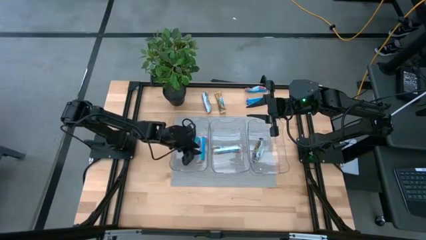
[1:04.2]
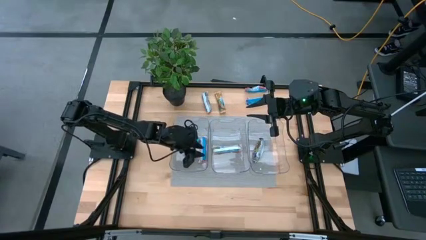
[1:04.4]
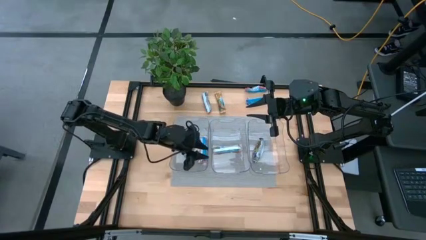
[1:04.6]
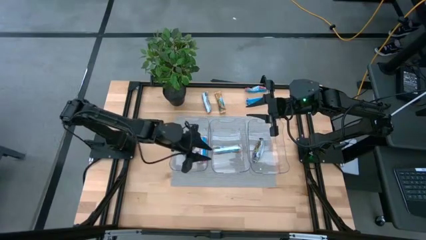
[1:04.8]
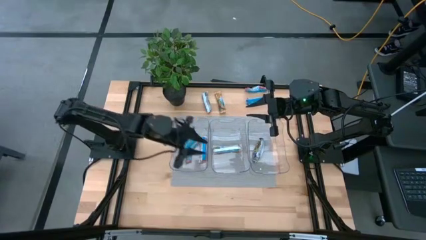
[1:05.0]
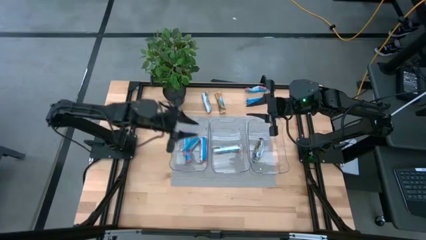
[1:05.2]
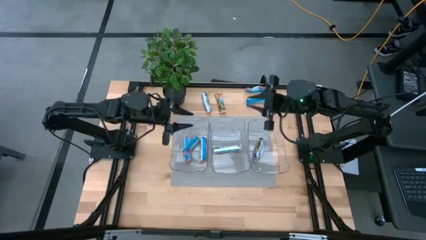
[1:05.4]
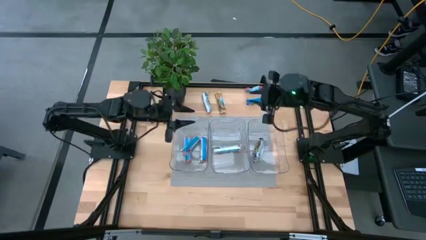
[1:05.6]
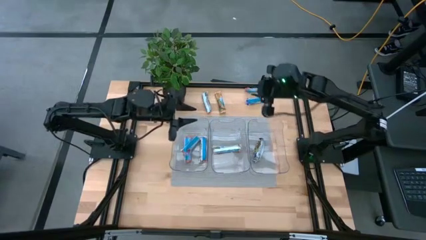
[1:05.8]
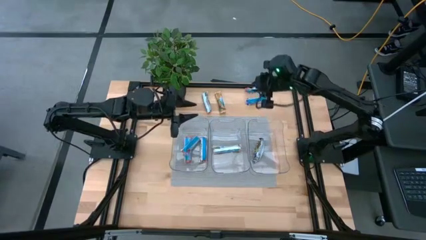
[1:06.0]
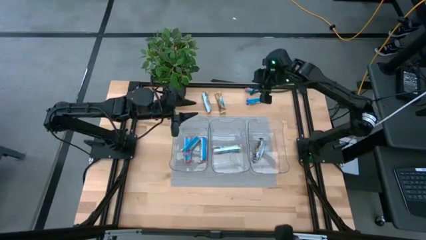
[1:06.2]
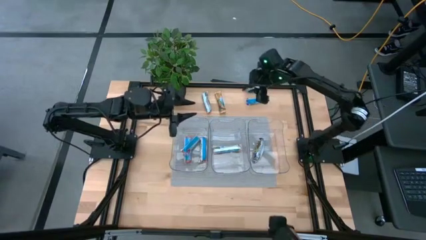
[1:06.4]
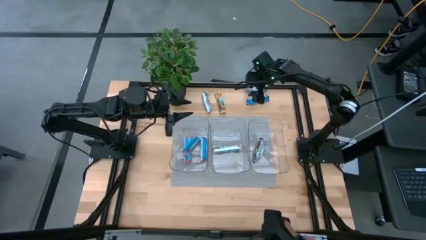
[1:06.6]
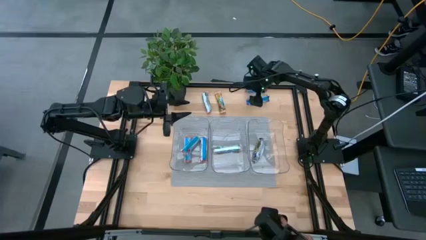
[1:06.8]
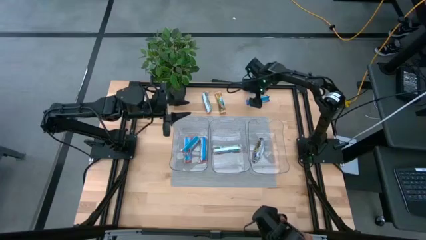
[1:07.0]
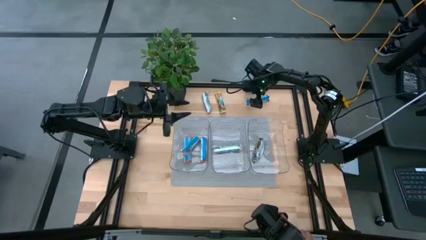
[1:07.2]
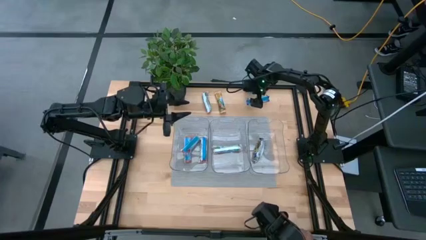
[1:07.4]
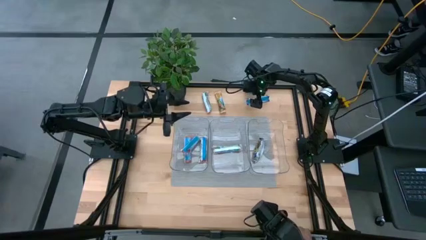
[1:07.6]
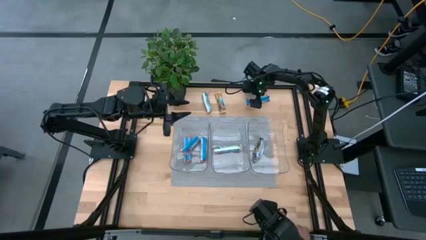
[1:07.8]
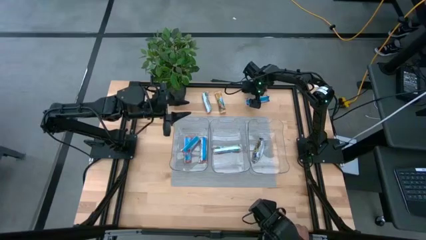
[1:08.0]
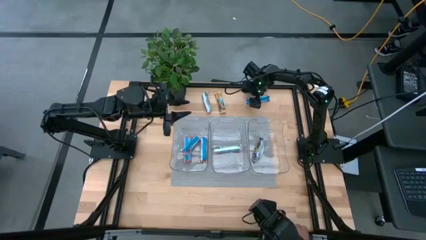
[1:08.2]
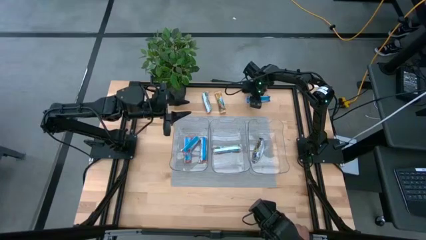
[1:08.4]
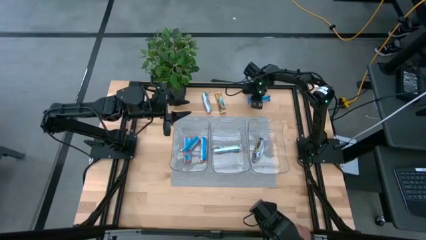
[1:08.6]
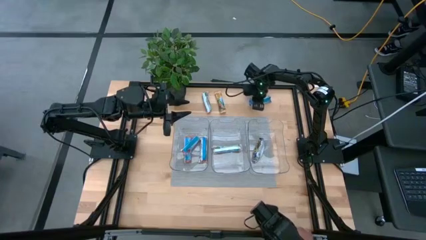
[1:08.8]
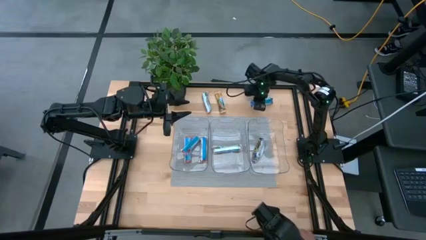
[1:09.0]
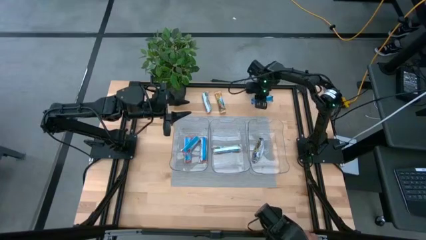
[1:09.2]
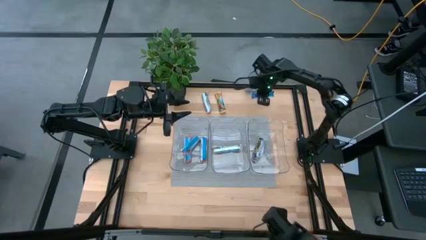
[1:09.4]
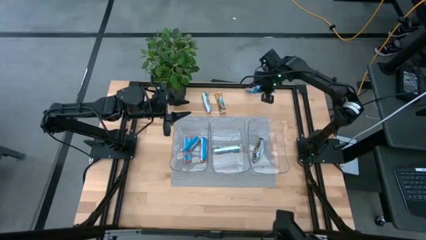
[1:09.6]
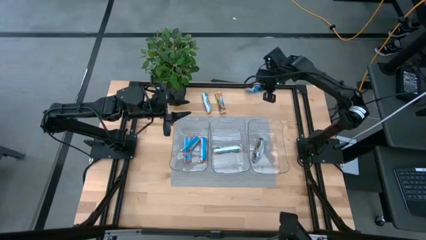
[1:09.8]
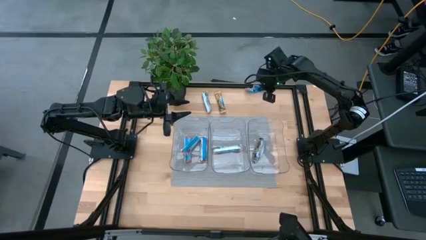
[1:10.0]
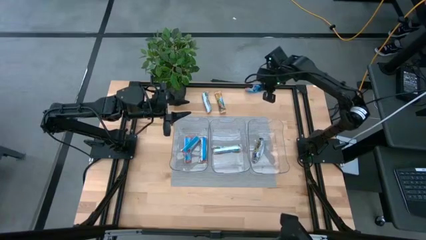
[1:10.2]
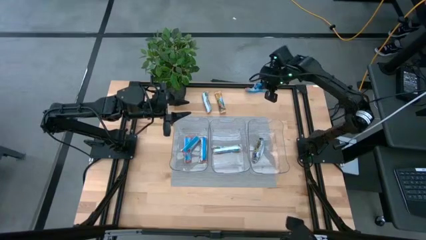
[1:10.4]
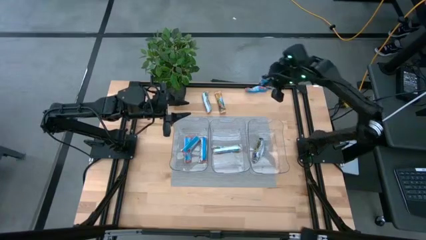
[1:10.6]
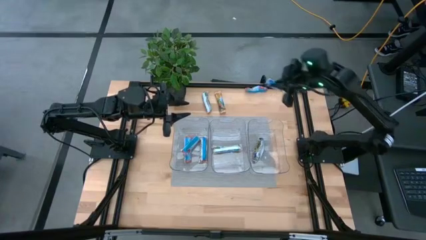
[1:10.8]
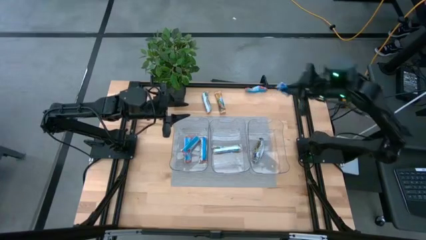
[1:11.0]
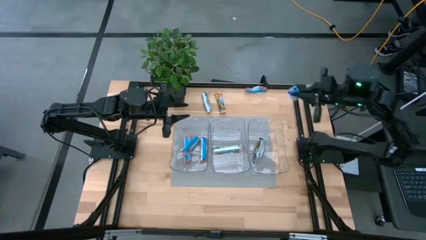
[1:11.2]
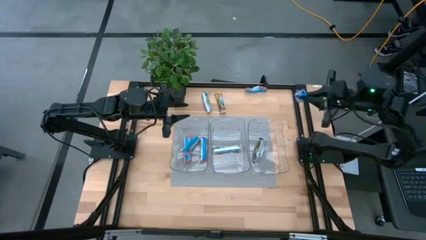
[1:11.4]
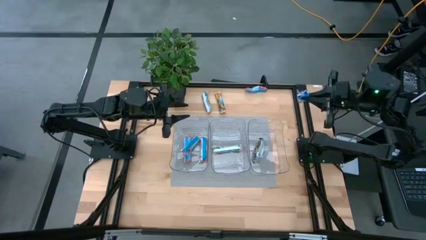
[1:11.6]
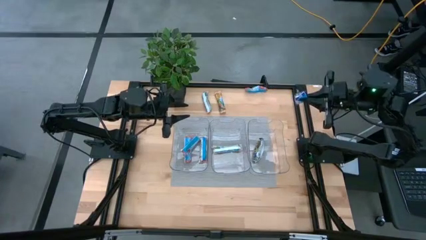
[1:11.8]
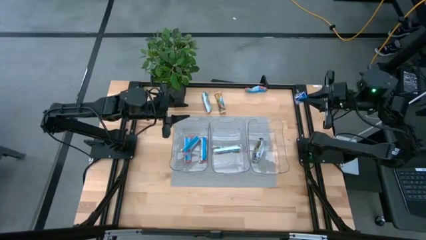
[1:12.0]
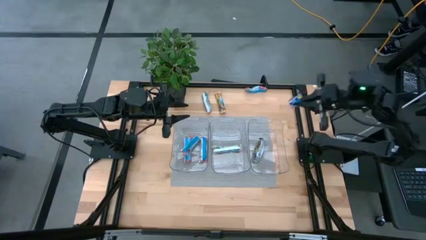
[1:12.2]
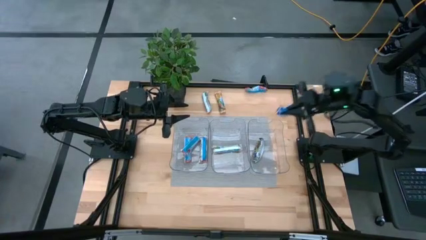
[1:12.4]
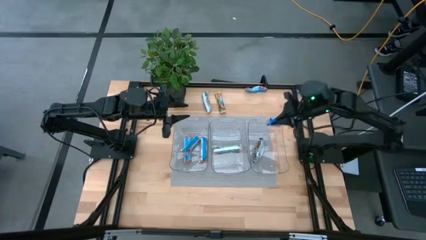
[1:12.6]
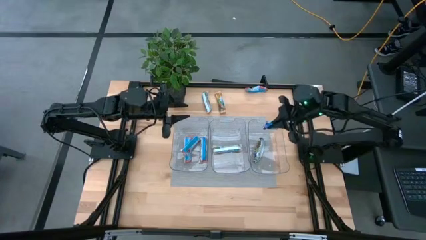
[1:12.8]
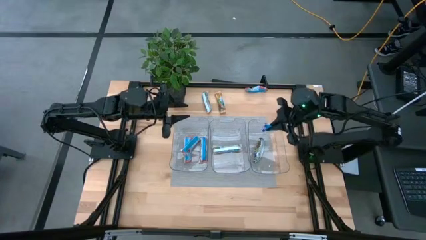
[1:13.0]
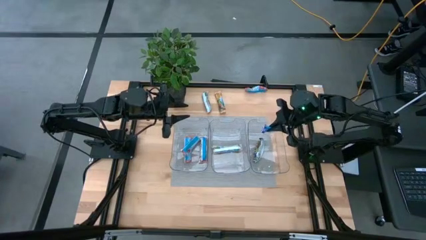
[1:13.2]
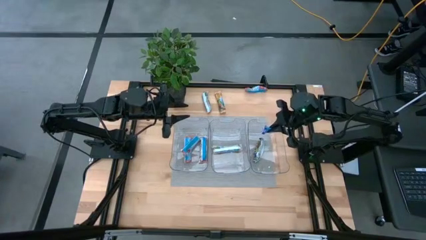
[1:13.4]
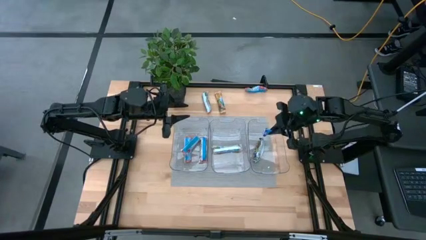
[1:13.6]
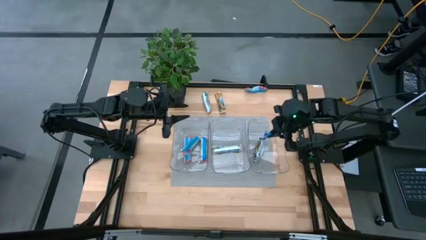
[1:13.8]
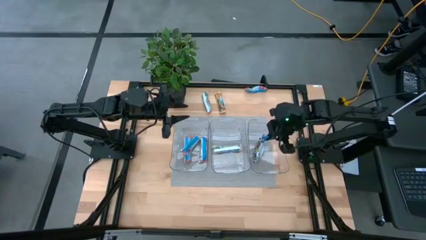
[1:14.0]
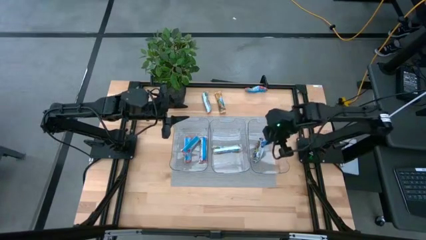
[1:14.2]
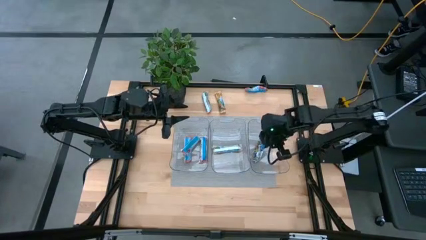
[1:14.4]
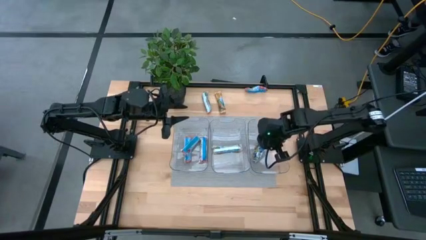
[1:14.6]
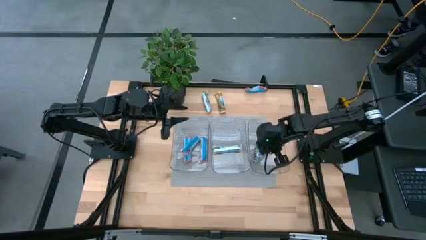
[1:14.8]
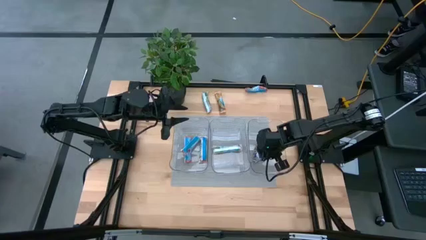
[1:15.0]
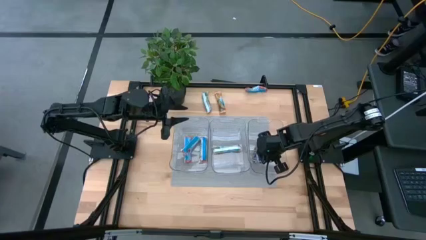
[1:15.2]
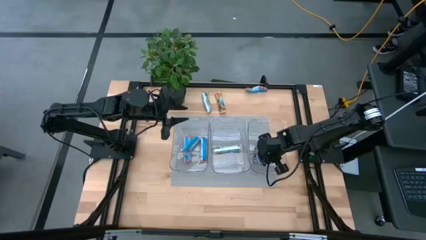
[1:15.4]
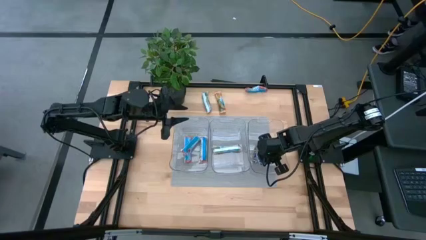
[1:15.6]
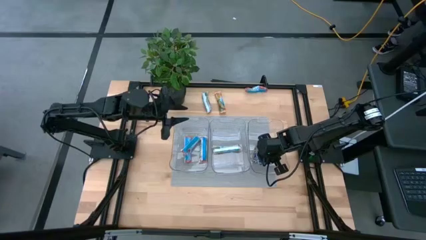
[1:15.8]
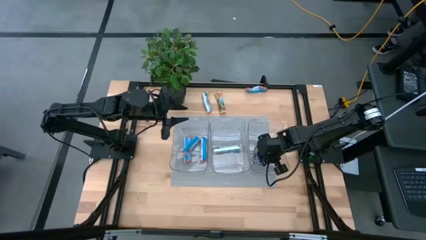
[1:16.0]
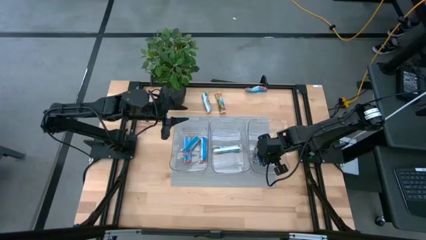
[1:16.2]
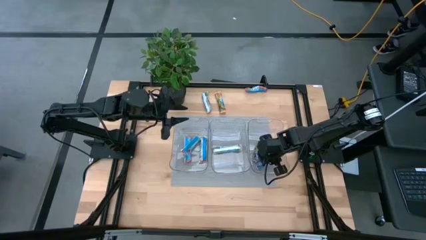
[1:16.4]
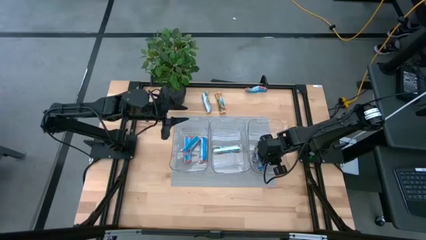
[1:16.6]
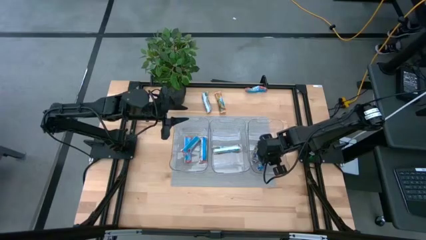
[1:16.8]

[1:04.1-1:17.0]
Task: Pick and place Granola Bars by type
Put the blue granola bar into the right transparent bin

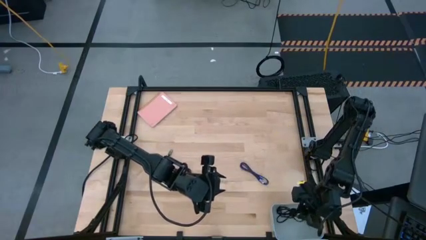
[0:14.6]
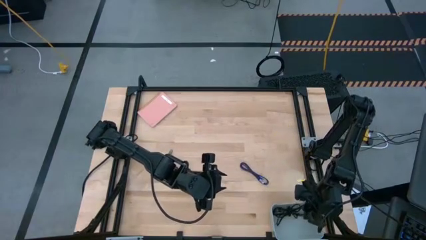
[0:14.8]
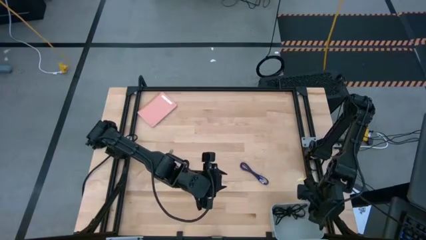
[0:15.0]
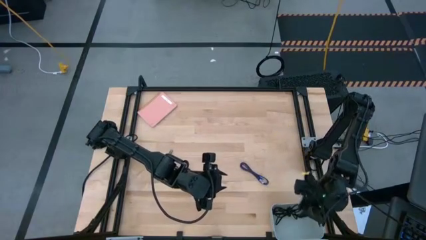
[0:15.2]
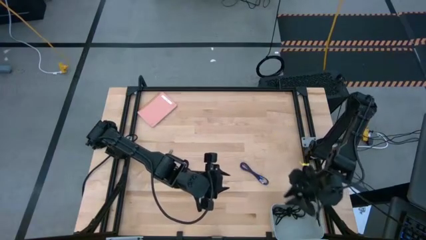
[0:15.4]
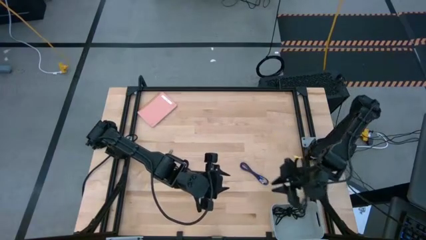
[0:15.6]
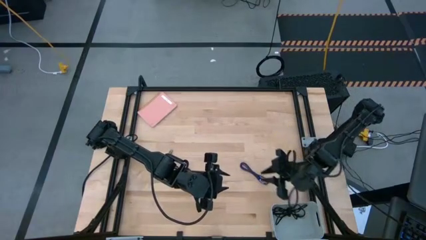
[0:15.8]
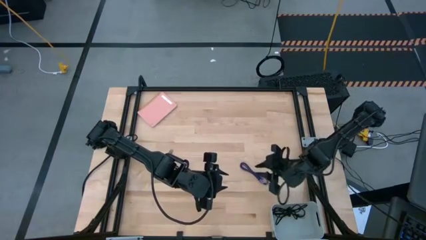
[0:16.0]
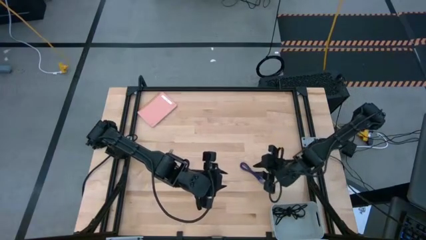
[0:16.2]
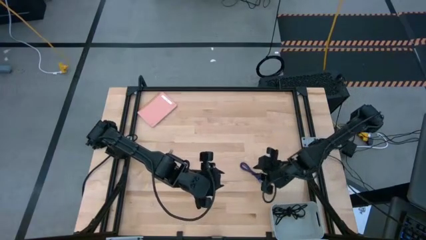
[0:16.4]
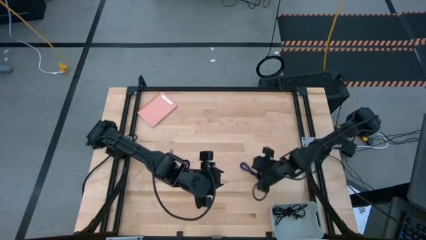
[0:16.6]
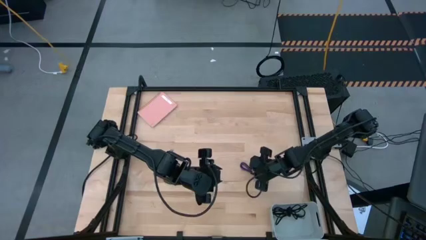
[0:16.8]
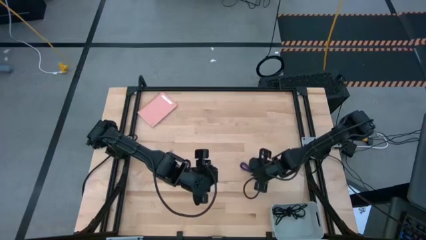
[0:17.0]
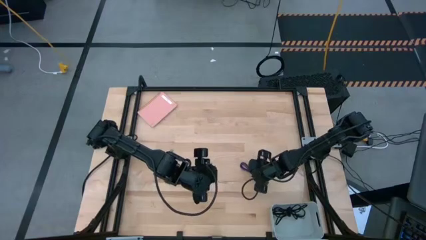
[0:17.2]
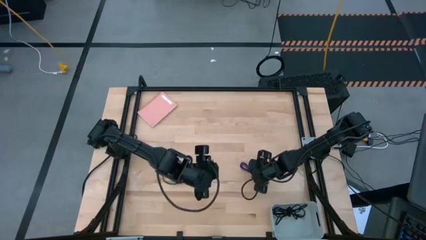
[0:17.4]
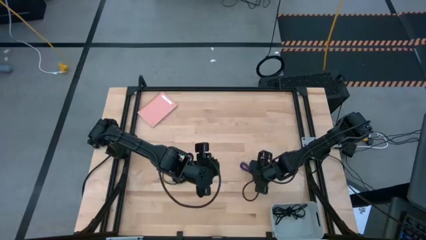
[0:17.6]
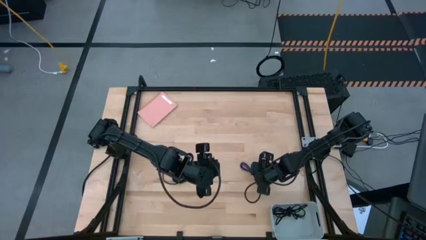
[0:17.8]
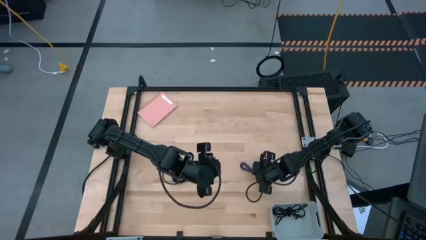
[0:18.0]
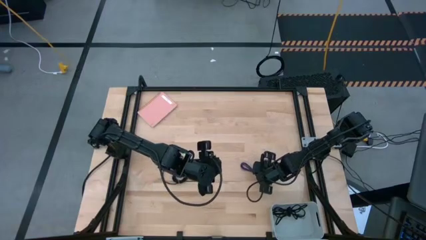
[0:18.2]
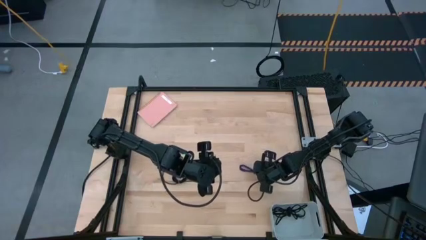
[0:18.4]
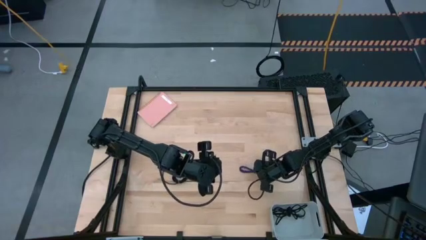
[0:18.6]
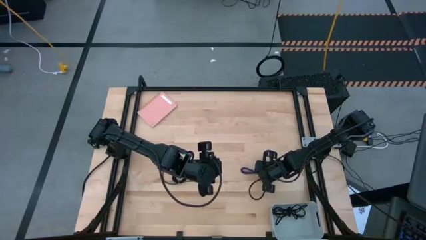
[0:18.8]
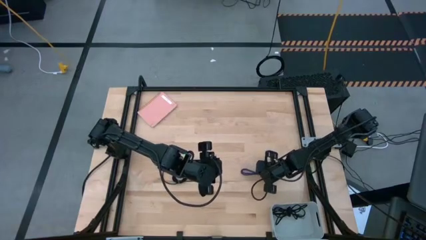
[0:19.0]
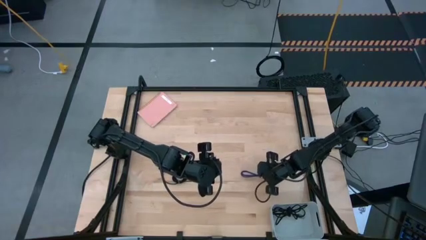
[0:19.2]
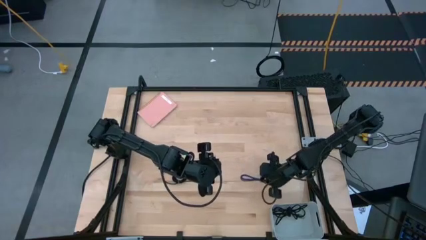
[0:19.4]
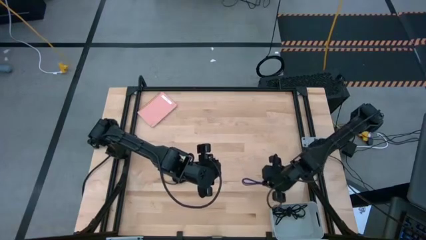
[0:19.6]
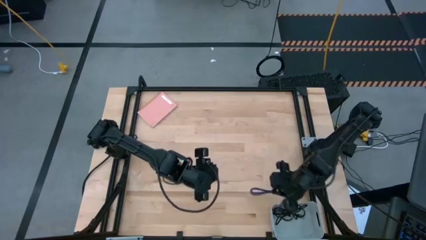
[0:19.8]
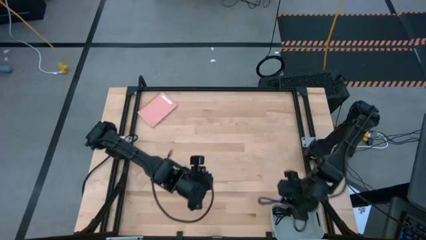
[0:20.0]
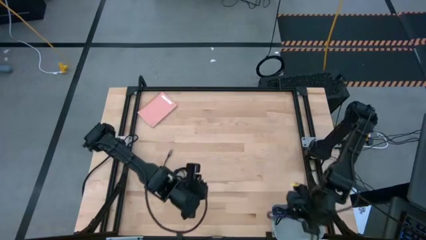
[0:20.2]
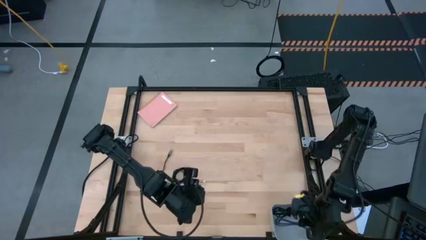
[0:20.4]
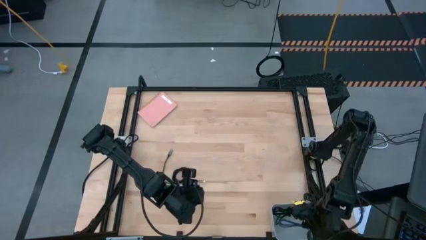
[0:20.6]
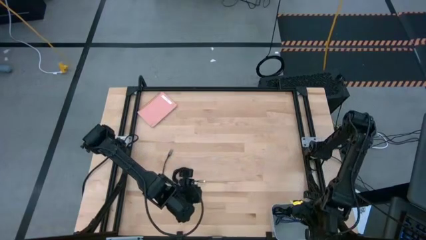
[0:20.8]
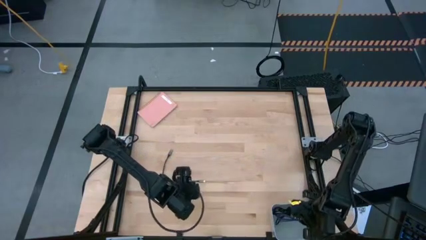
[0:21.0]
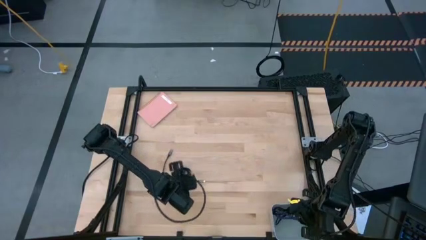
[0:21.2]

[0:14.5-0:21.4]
Task: Pick and place USB-C Cables
Put the violet charger cable into the bin
